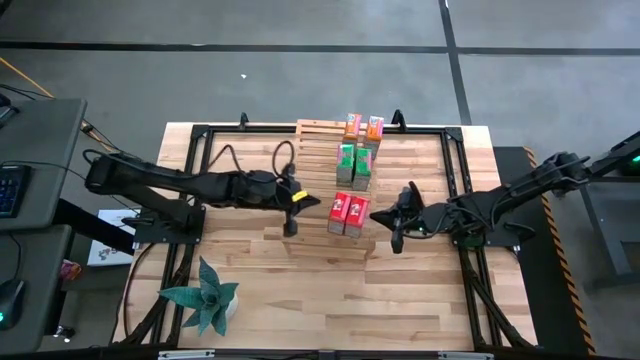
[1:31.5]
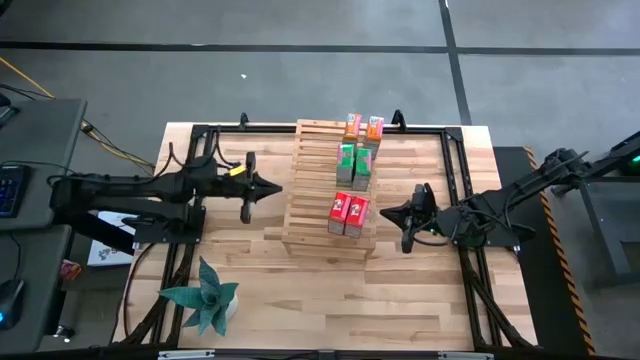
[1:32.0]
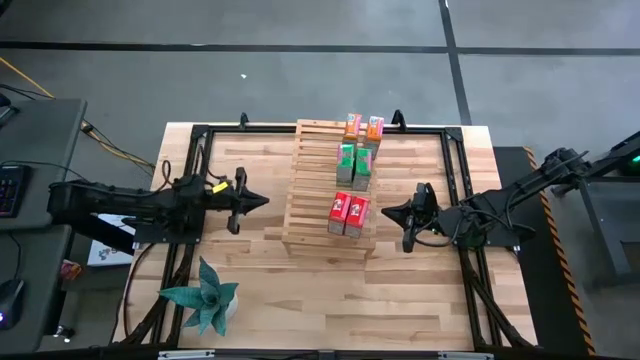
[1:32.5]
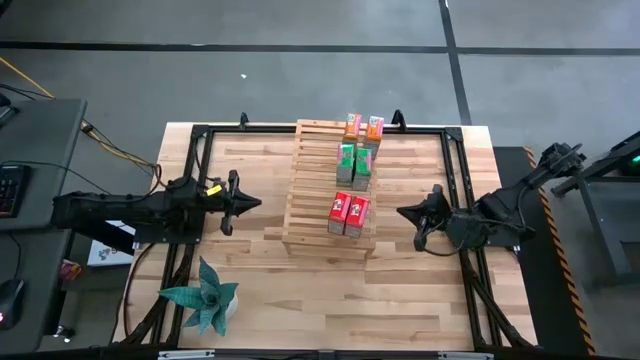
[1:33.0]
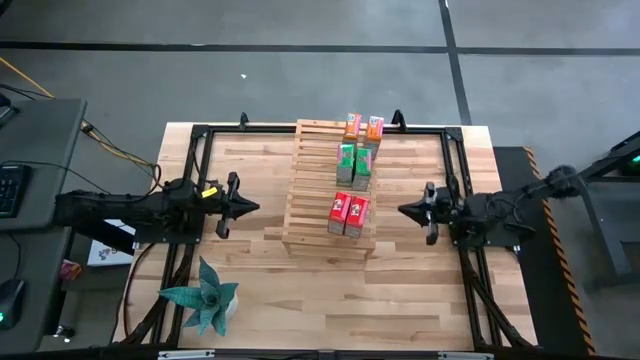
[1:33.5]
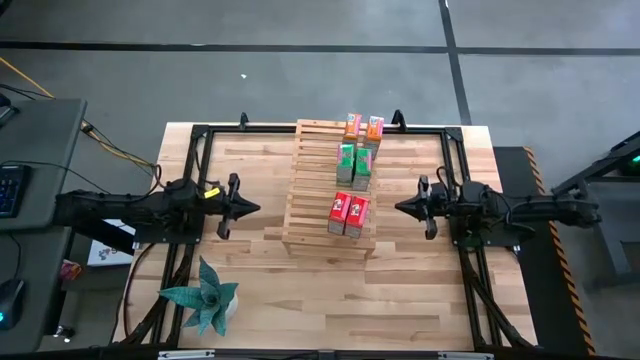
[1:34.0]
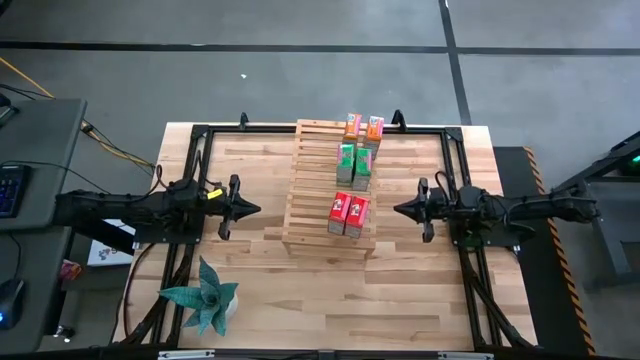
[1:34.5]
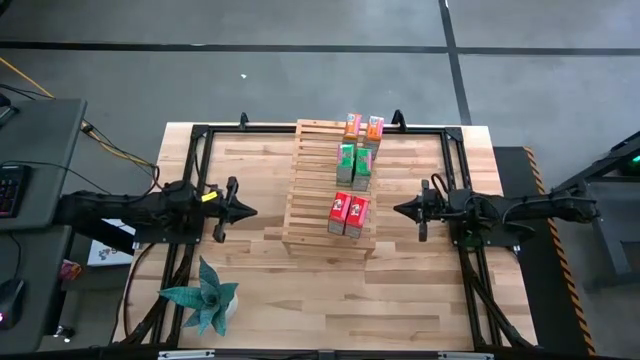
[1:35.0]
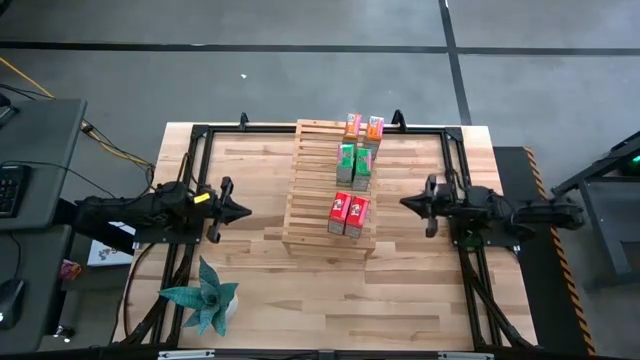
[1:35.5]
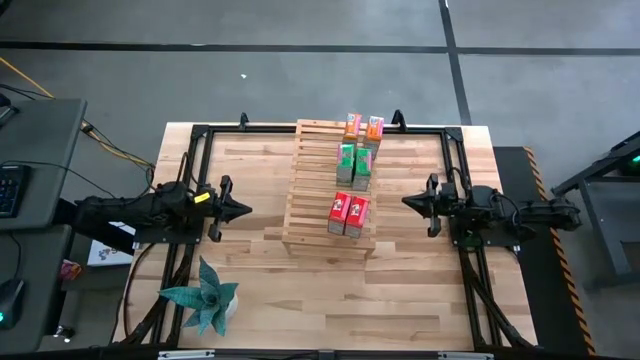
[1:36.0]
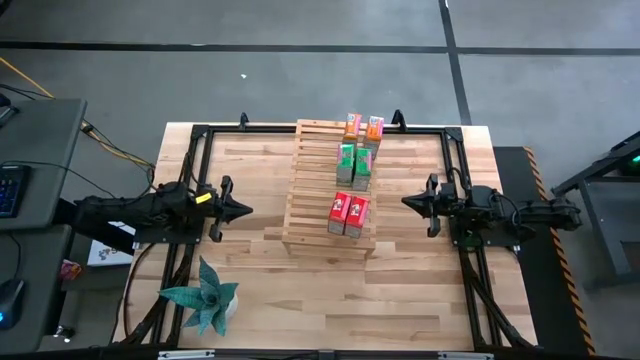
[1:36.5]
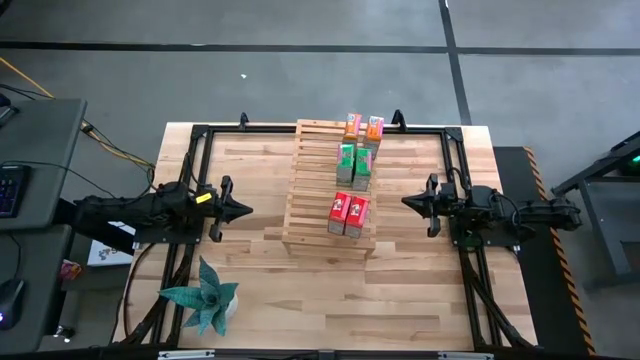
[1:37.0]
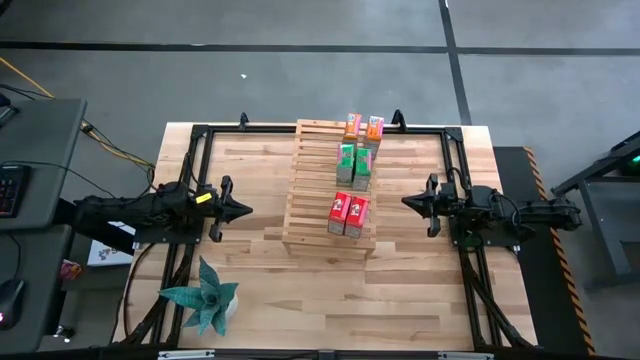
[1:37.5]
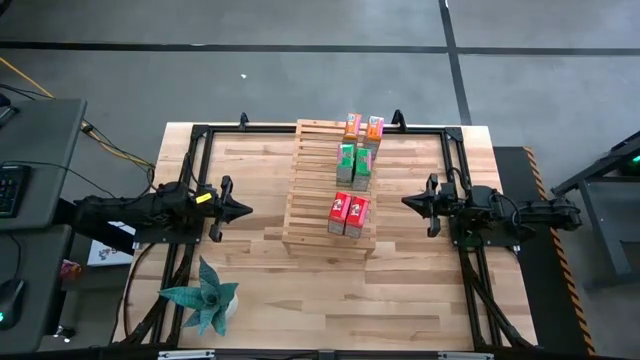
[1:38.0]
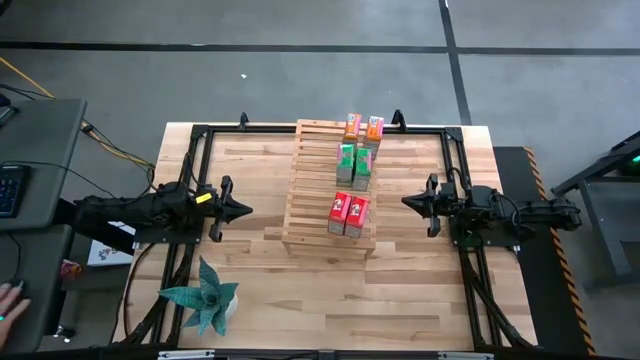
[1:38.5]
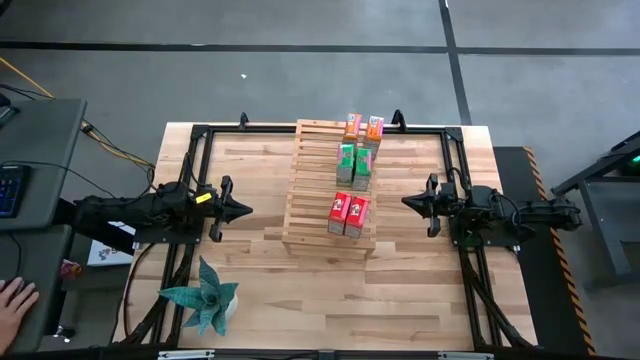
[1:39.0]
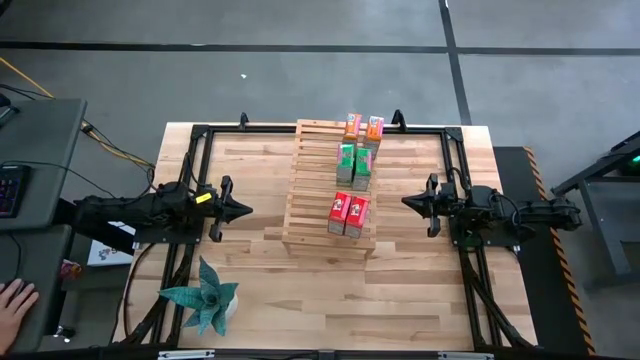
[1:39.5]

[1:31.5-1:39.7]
Task: Stack cereal on shelf
Return to Home Position

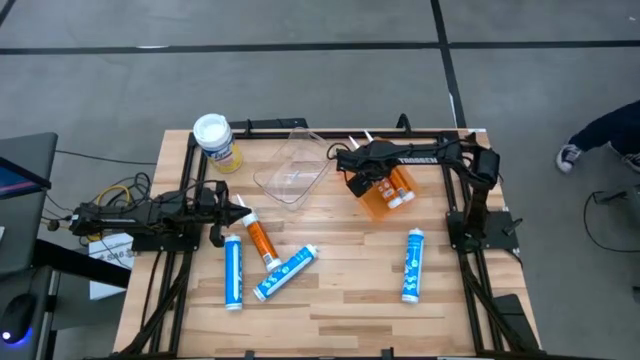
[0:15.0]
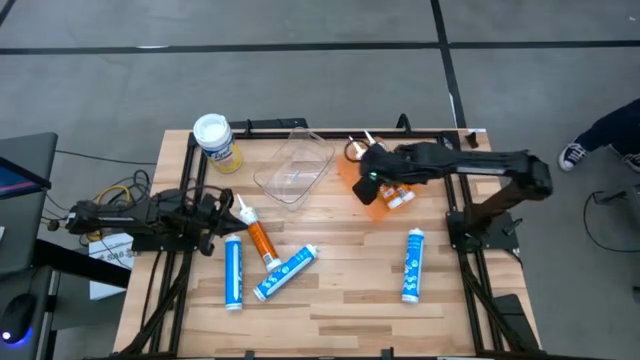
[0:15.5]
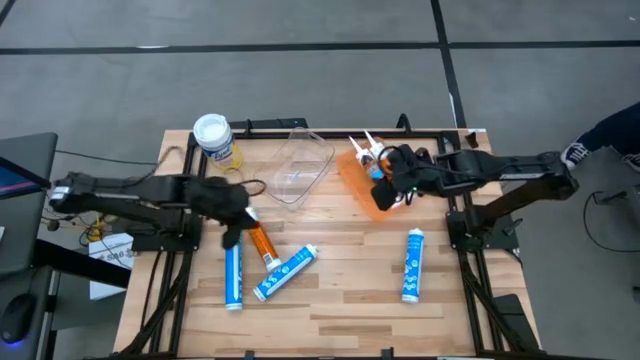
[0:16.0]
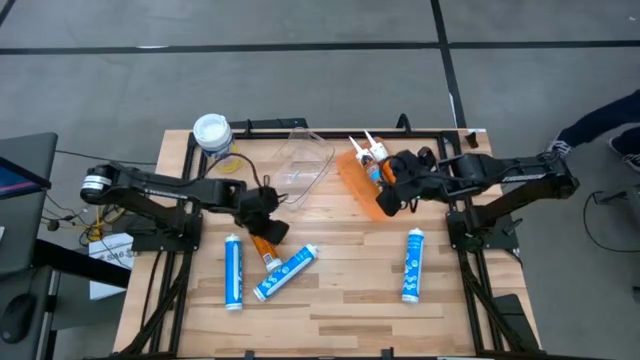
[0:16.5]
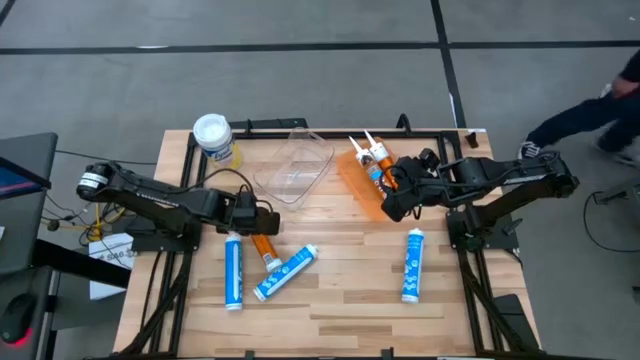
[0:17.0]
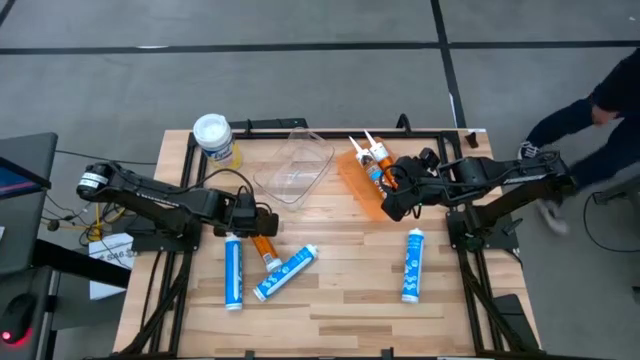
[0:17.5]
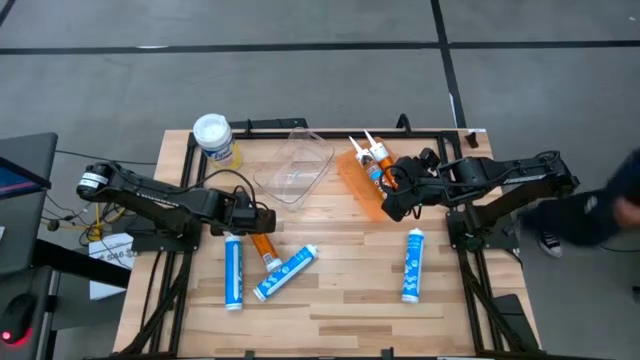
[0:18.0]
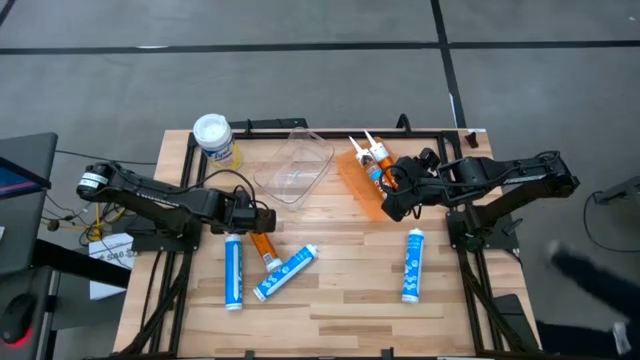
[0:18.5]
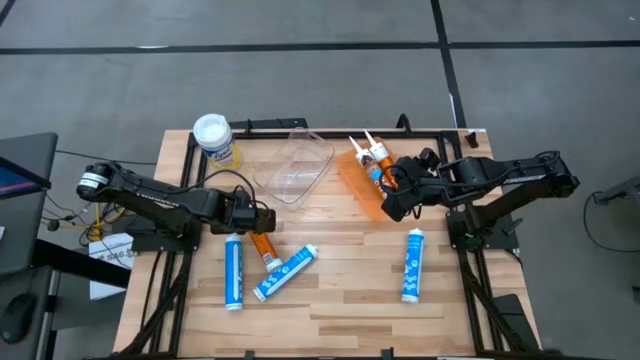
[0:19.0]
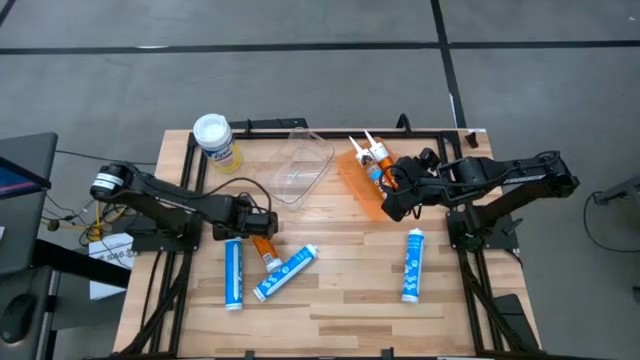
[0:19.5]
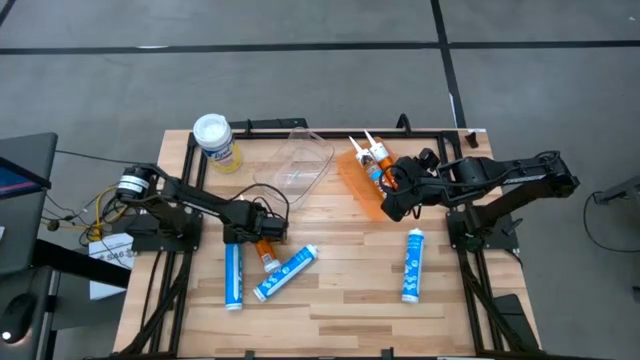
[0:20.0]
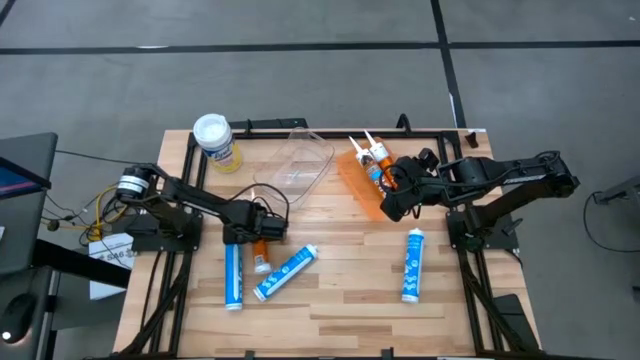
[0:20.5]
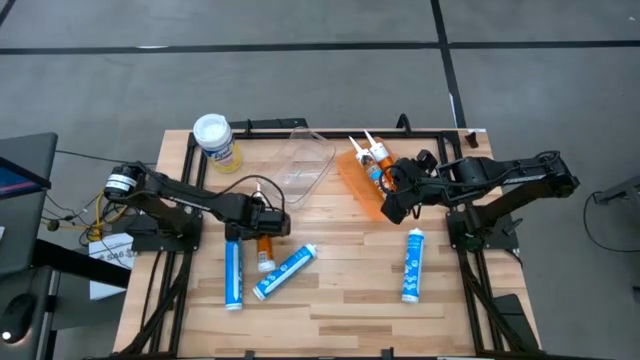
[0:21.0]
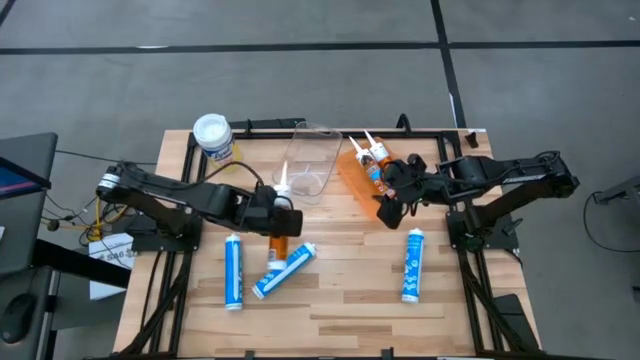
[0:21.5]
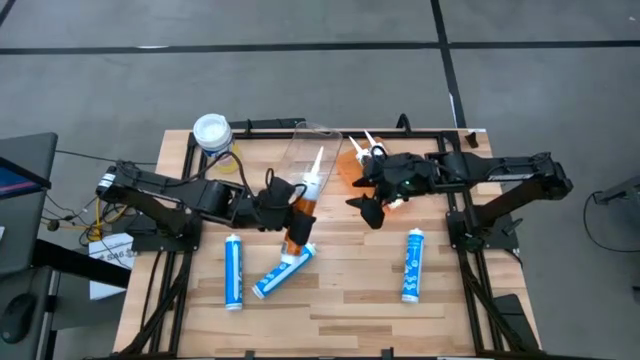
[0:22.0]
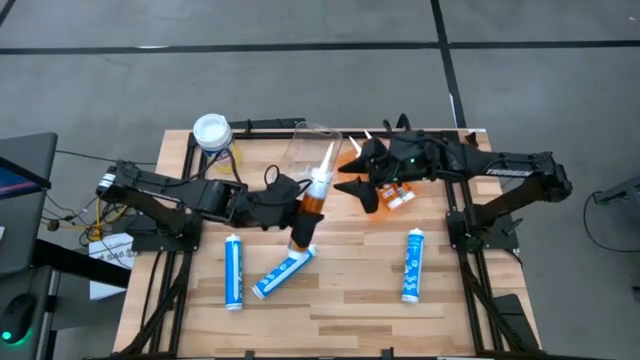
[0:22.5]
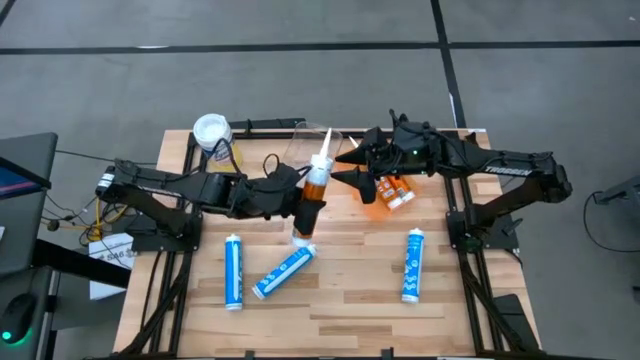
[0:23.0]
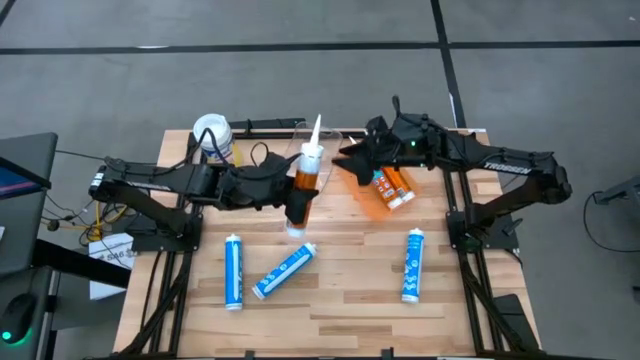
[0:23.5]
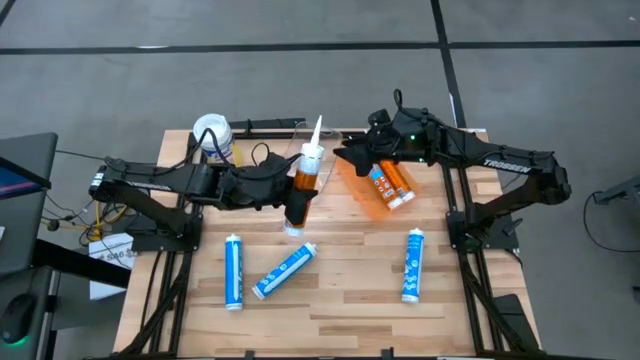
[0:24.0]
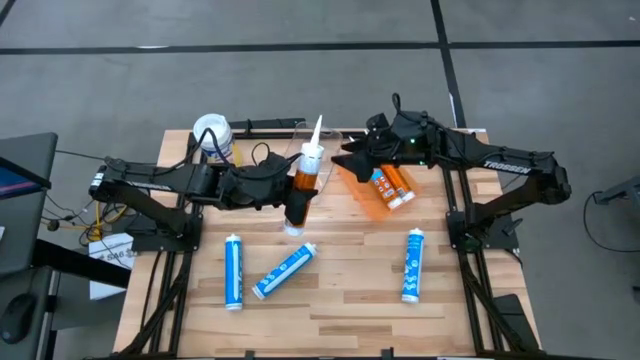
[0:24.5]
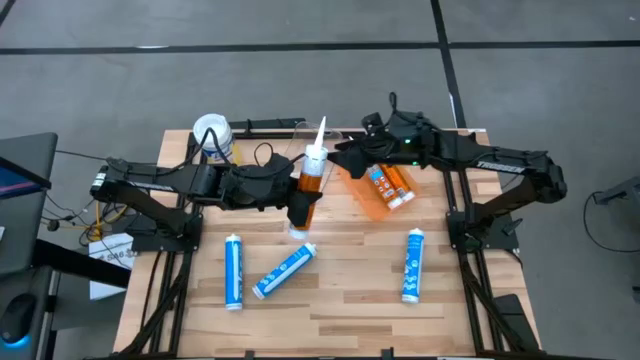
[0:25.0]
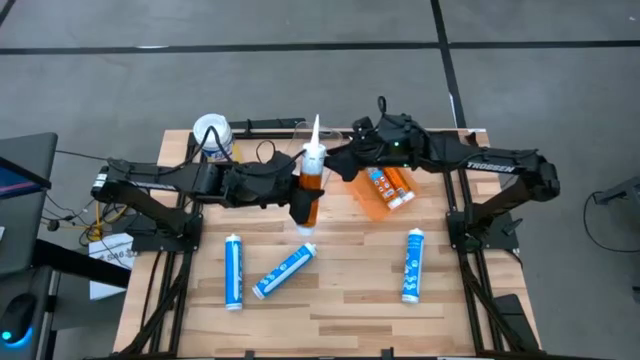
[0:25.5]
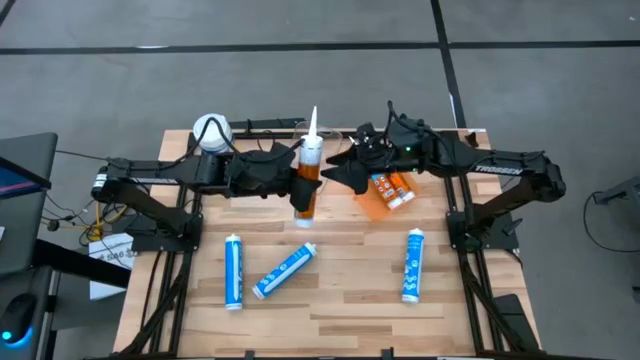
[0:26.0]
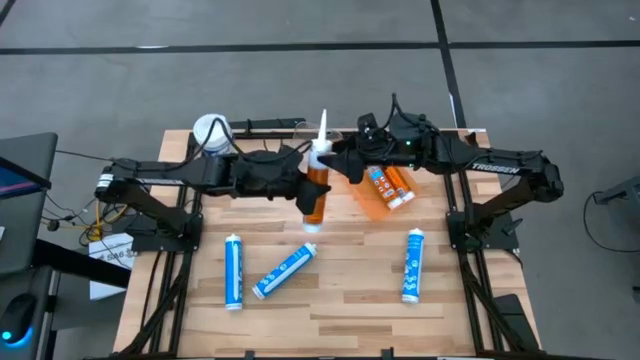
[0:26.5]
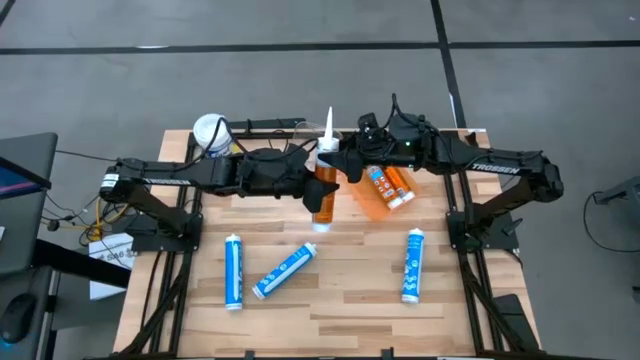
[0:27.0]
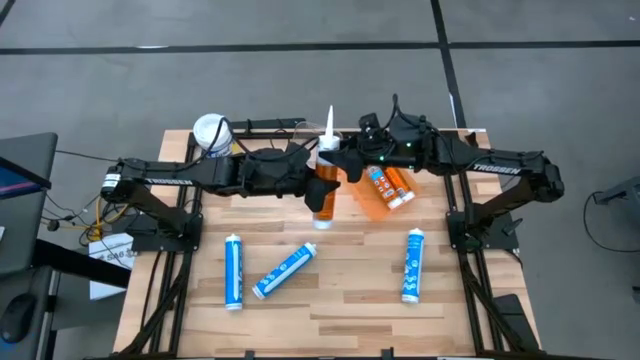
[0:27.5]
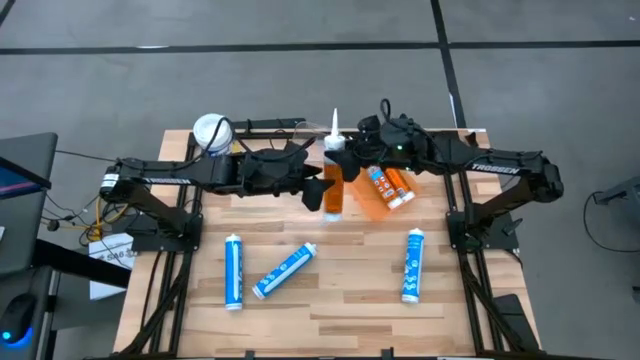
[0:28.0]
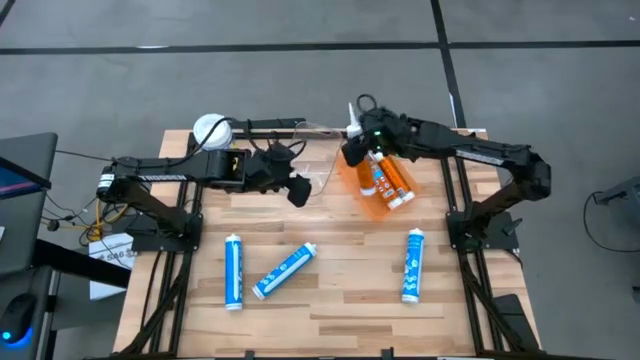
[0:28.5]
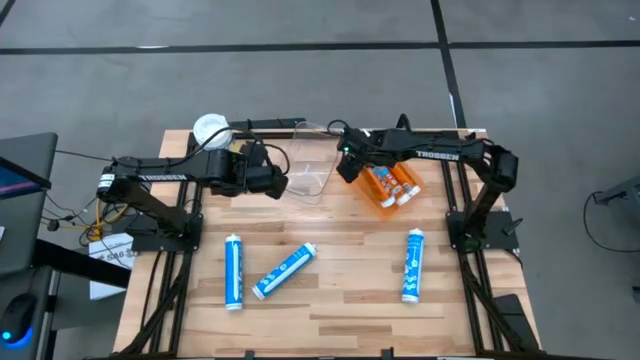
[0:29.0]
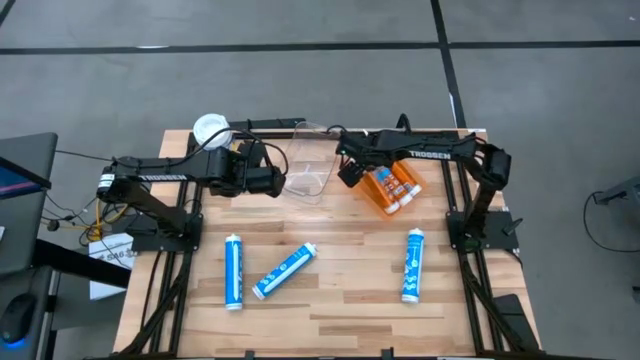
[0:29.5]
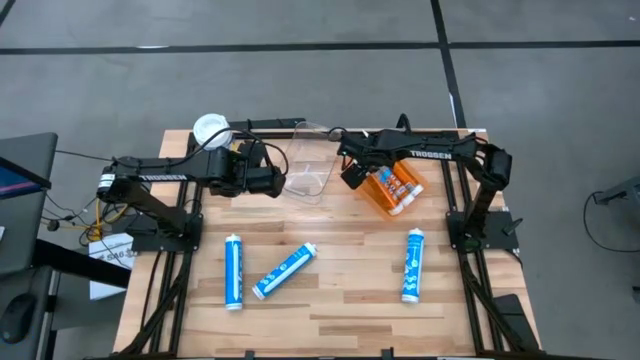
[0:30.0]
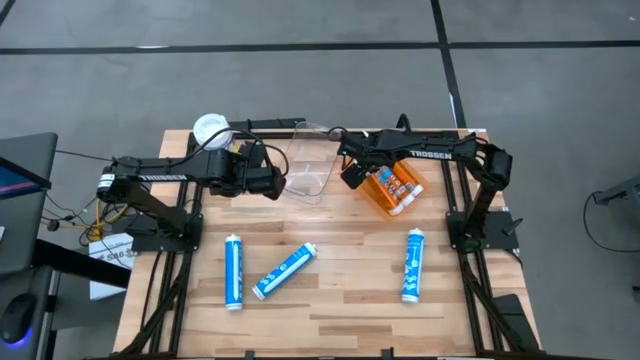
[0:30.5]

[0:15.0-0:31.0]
Task: Pick & place silicon tubes, Sealant and Lysol wipes
Put the orange sealant into the orange bin
